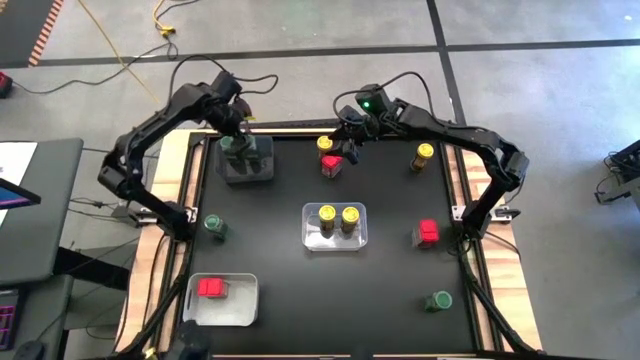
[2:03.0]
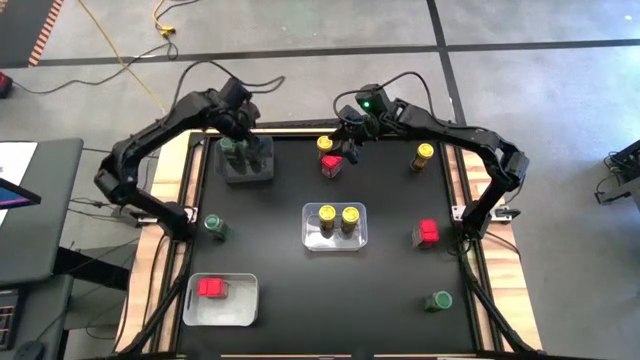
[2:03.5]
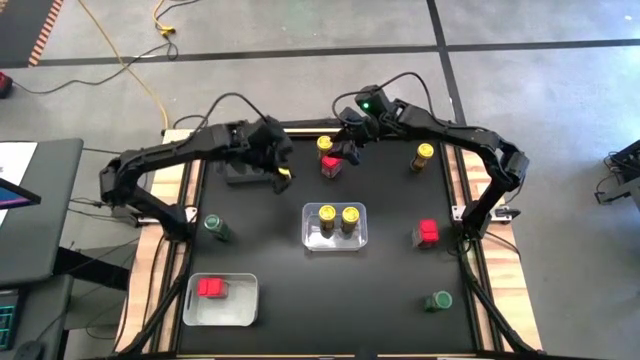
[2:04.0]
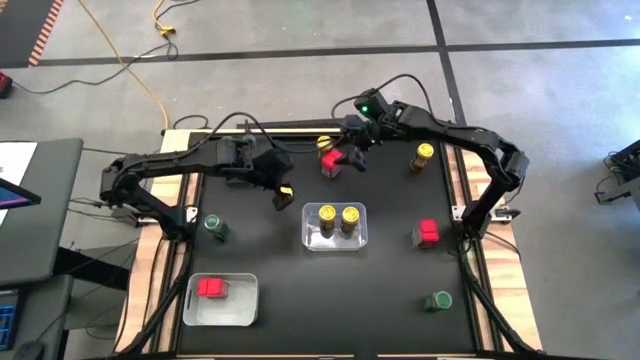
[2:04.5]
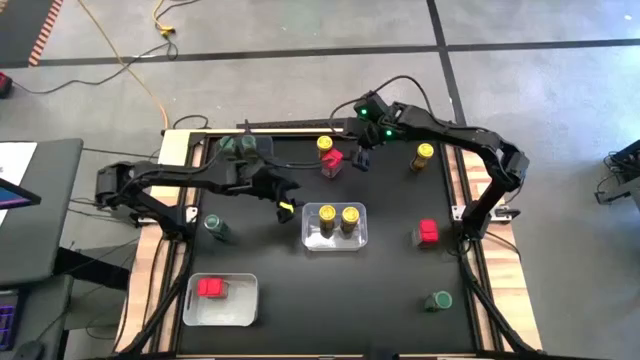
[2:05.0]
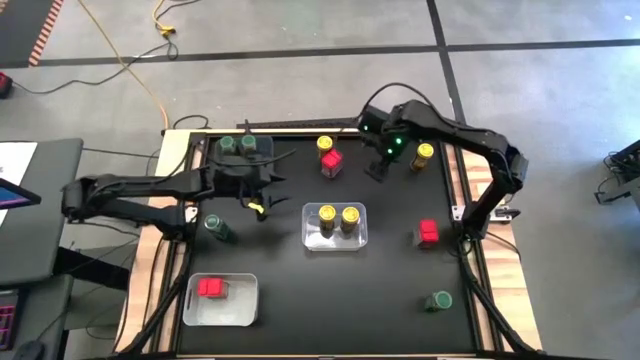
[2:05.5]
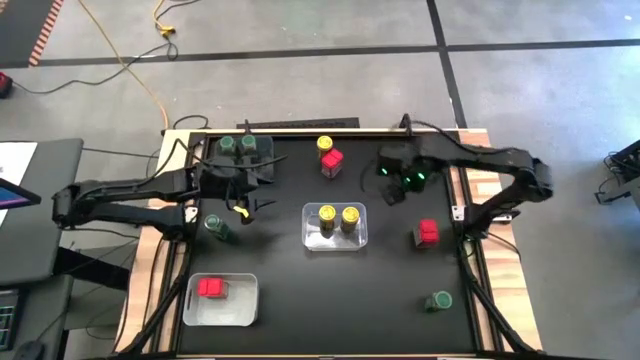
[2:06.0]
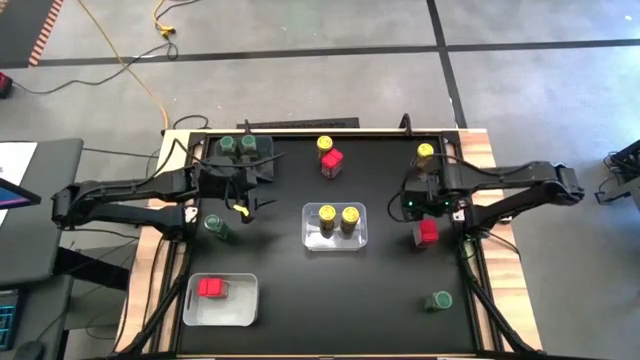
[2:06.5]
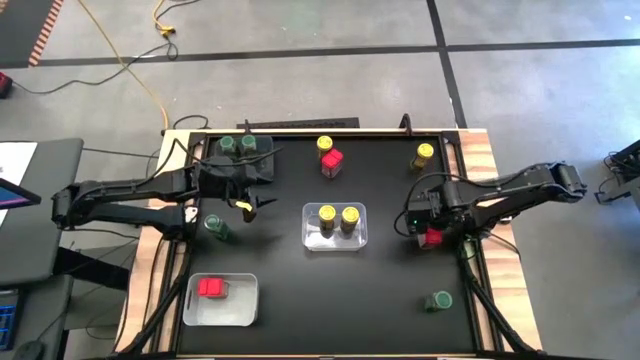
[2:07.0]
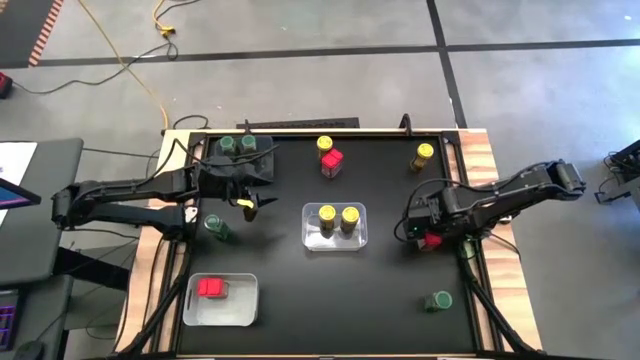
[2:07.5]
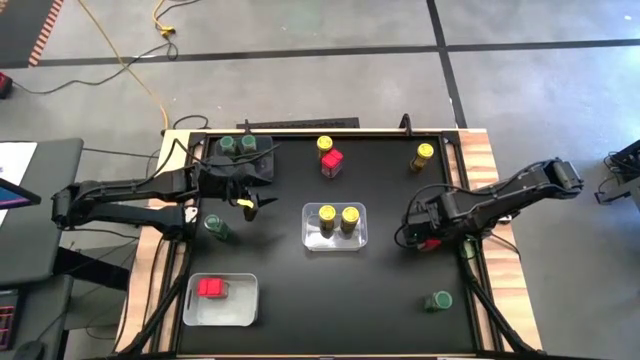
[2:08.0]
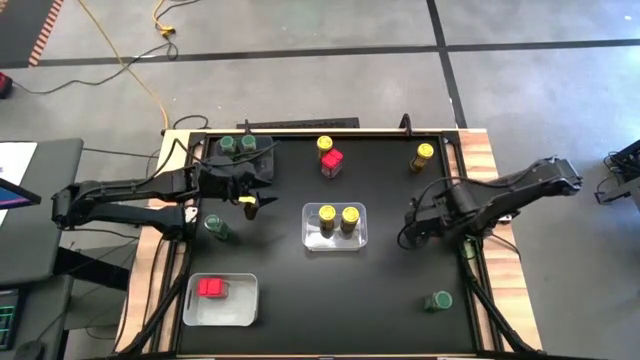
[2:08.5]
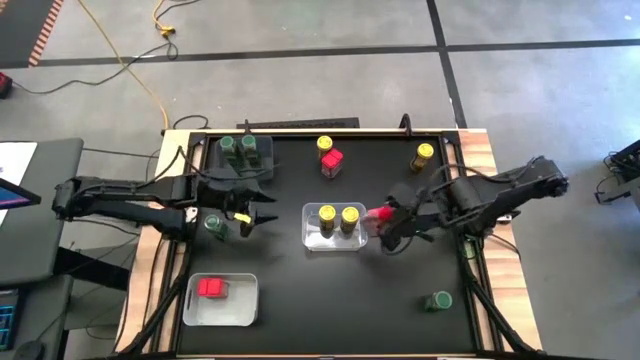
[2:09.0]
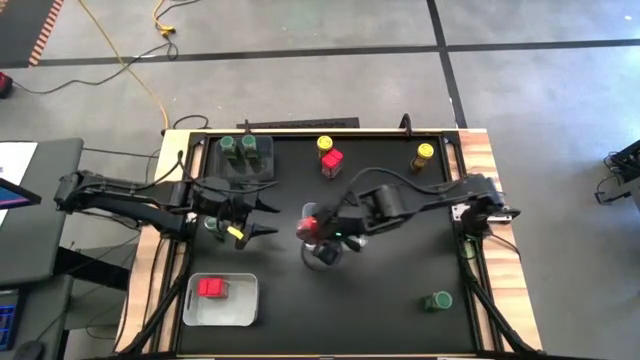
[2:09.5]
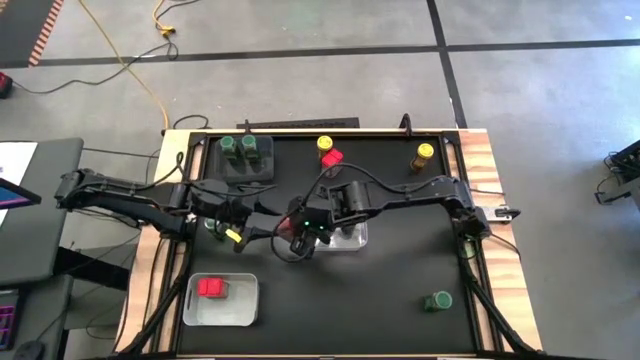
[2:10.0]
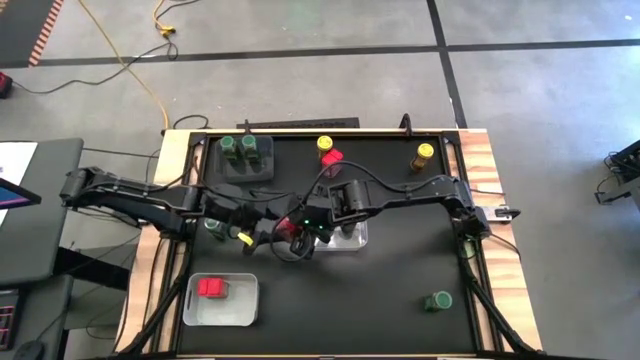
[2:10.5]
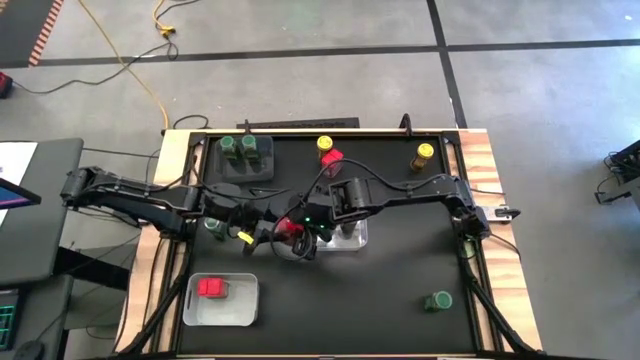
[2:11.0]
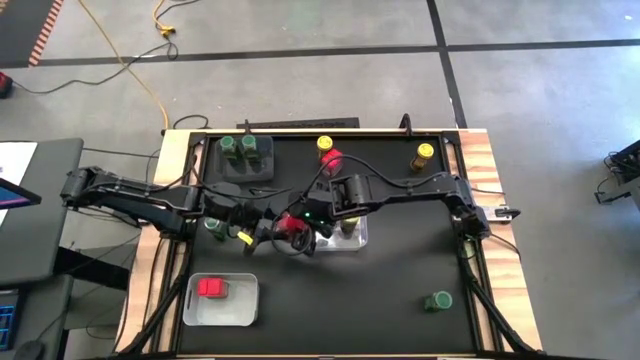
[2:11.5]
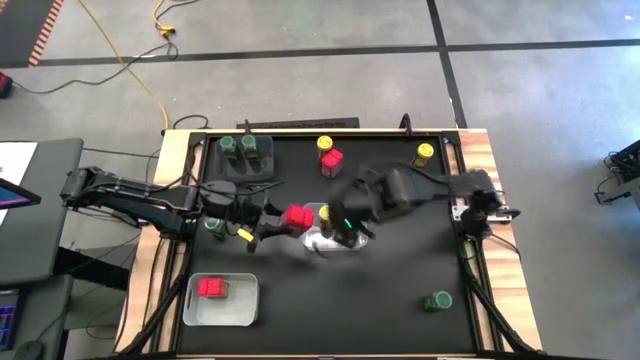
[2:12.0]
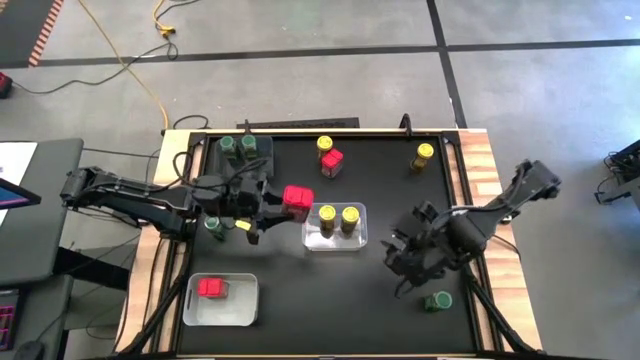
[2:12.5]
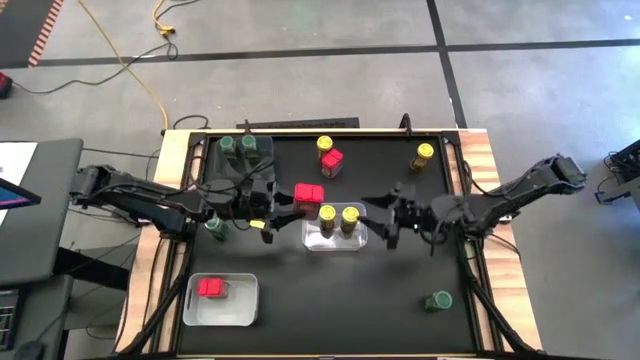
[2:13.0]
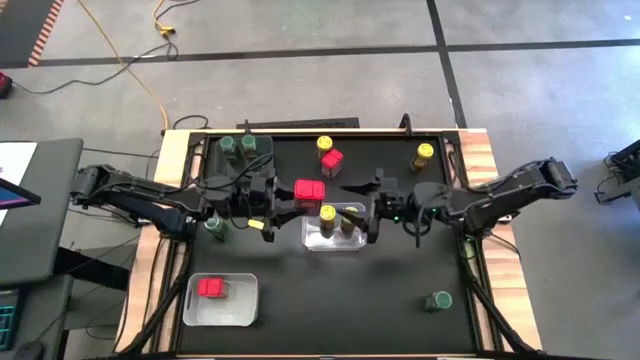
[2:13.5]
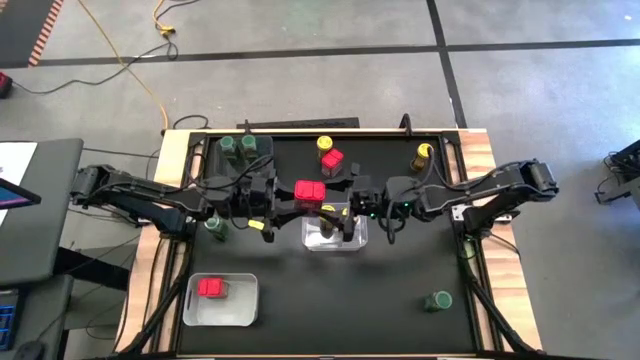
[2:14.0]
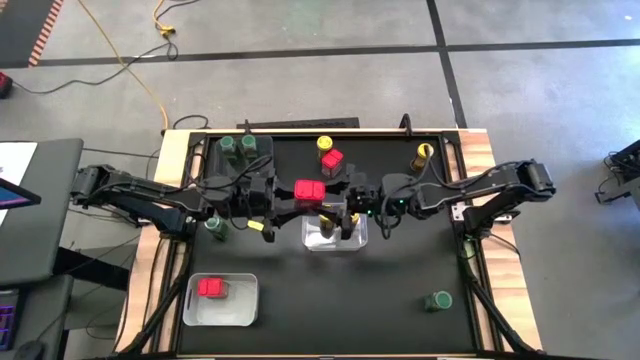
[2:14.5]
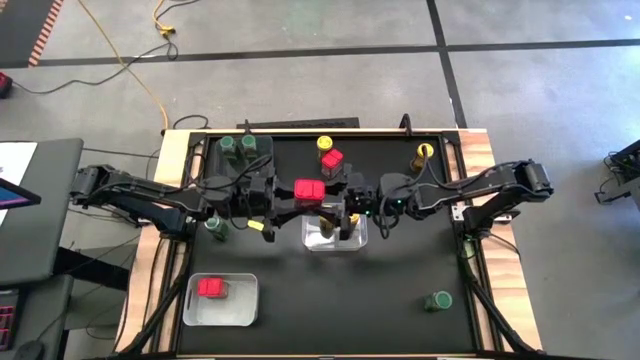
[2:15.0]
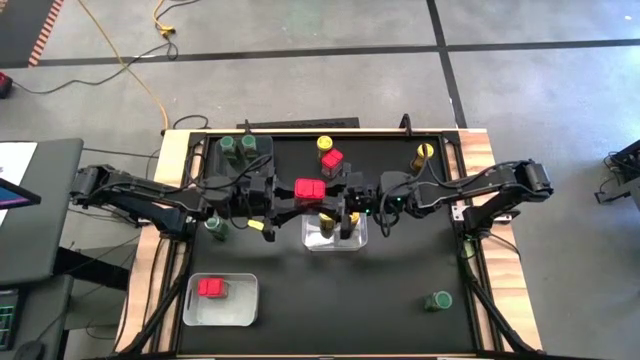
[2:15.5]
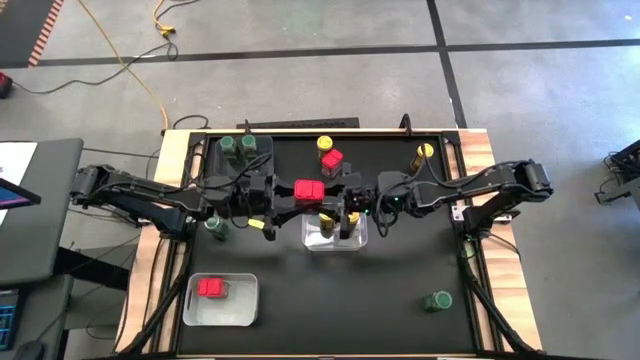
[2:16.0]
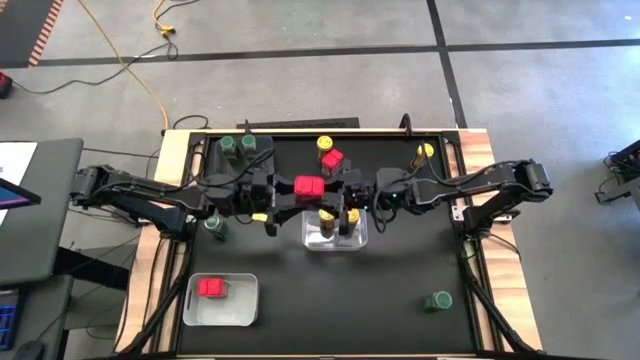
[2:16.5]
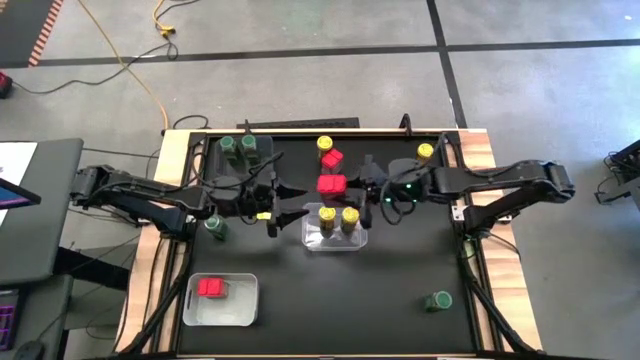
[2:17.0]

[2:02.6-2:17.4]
Task: Sort spices by type
Put the red seasoning can into the gray bin

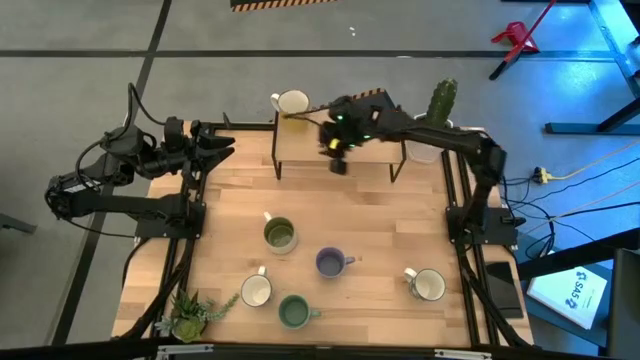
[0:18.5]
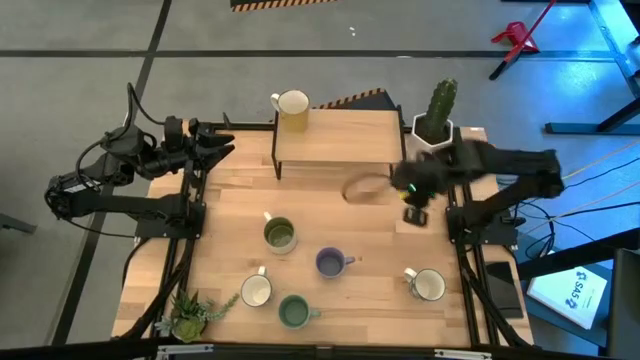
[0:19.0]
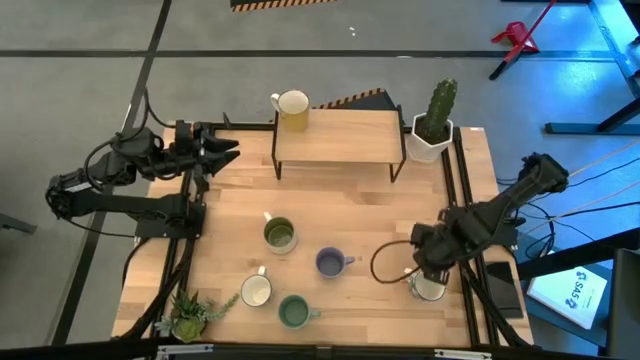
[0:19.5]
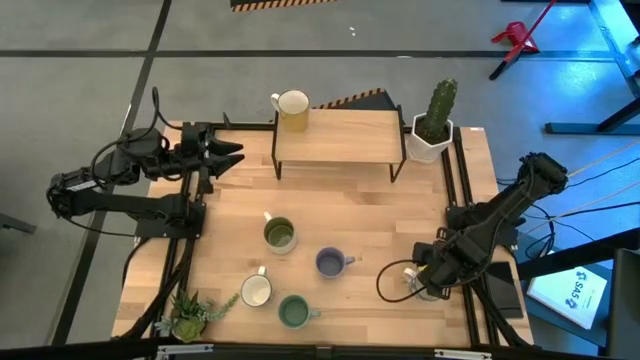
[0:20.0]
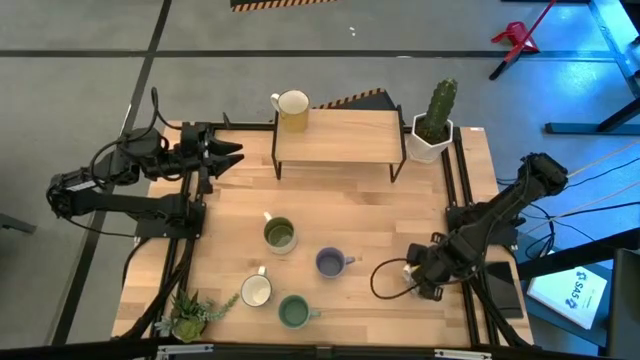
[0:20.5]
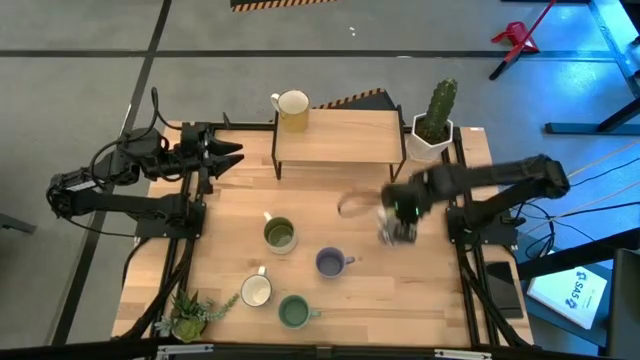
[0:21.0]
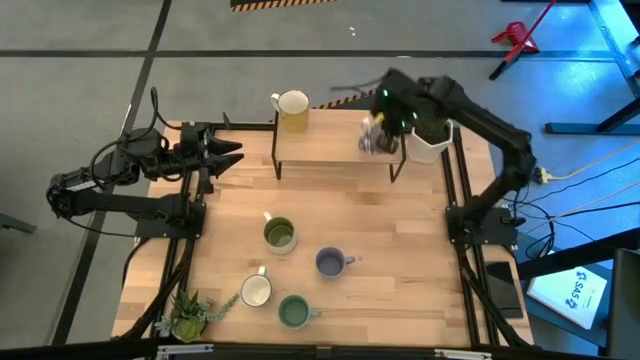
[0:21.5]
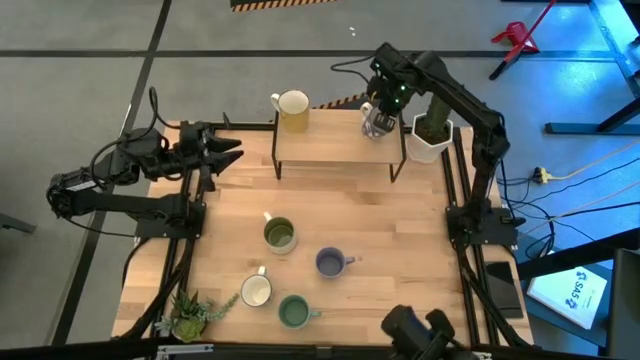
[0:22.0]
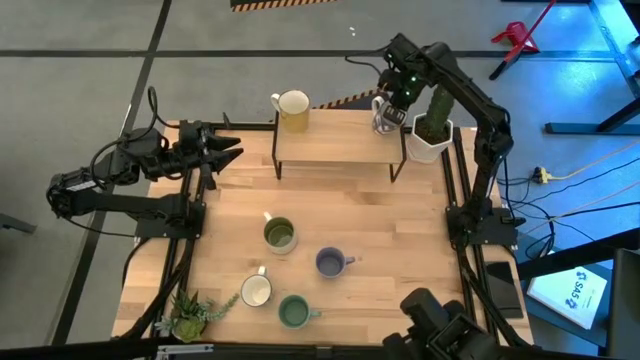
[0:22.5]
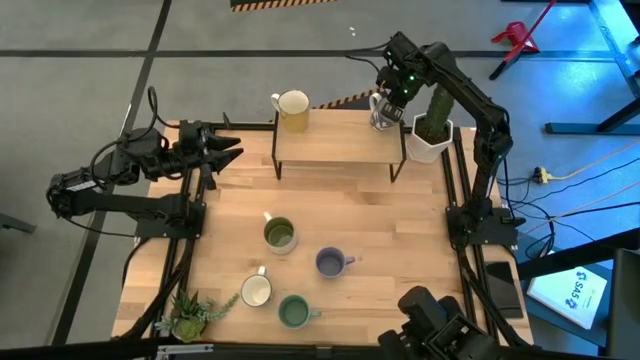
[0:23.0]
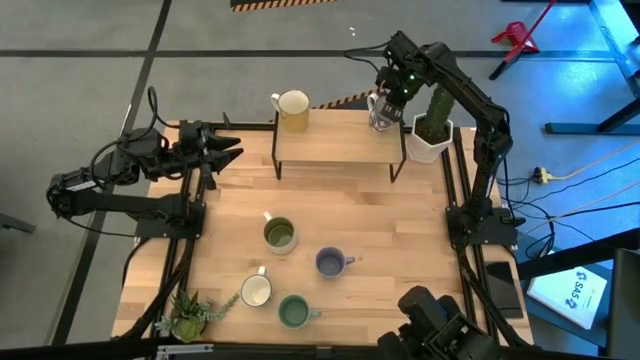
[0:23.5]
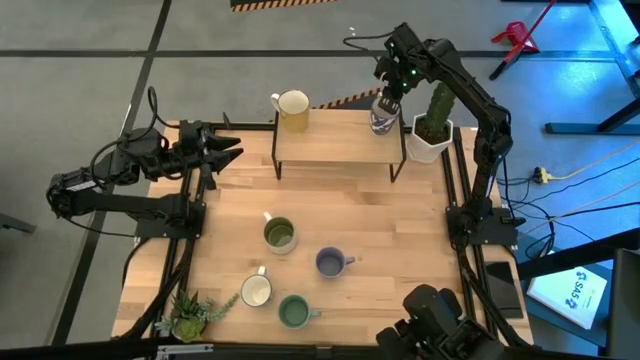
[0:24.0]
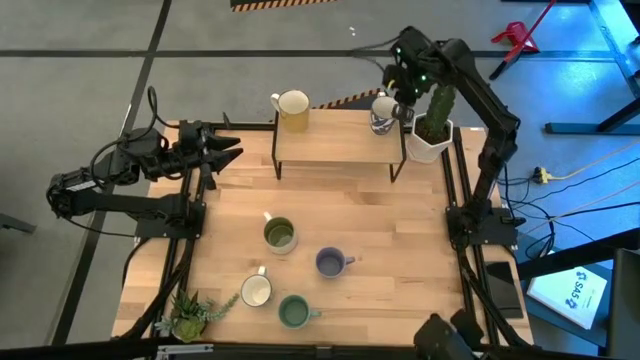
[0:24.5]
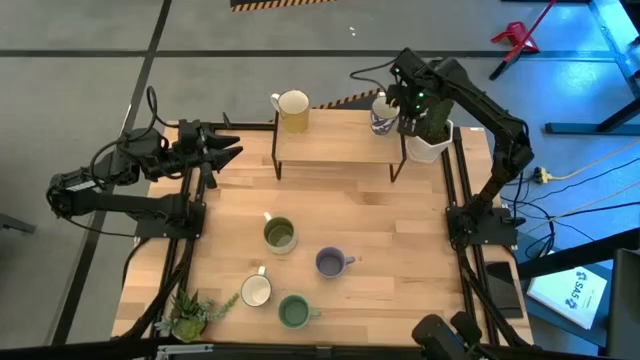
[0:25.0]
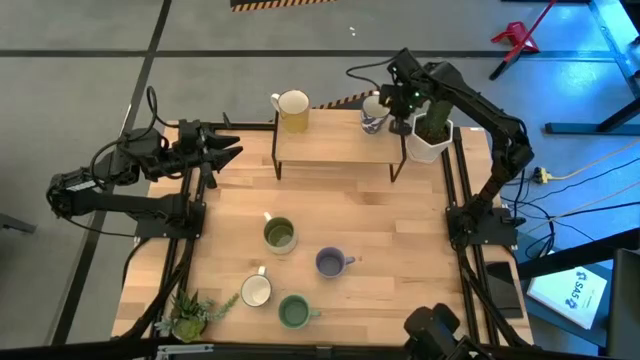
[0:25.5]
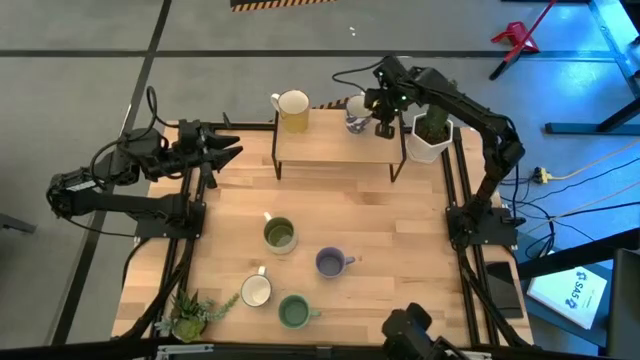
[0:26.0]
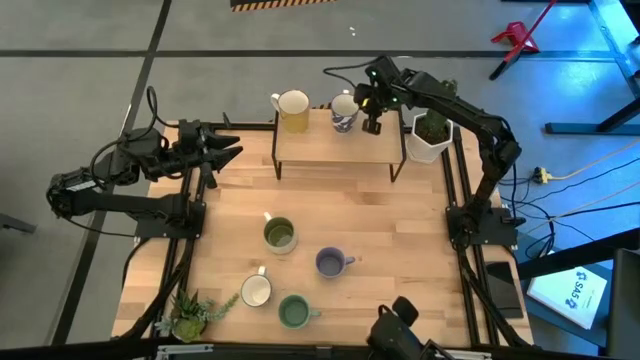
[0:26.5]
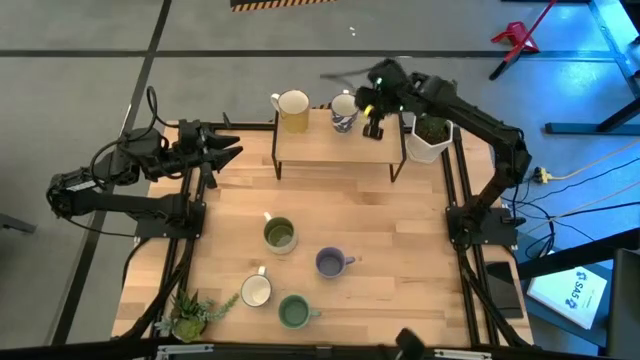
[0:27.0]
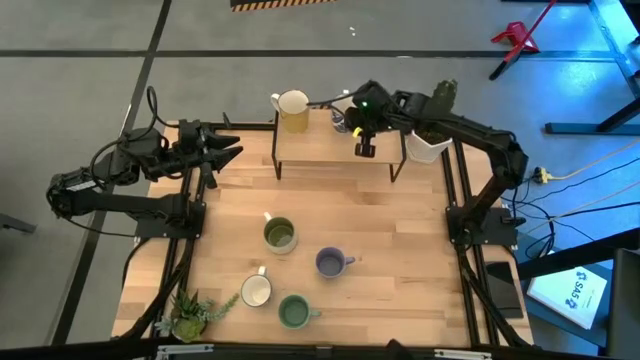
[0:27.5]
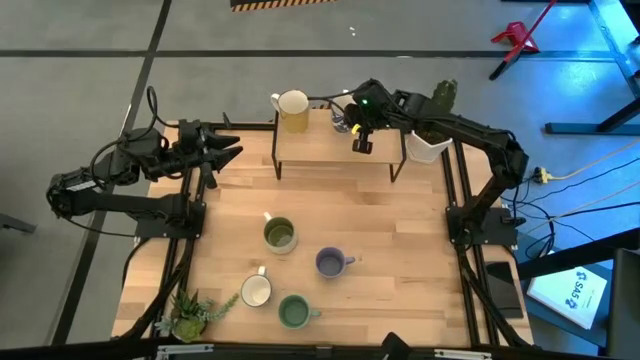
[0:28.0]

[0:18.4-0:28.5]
Task: Place coffee mugs
Put the right blue patterned mug on the shelf
